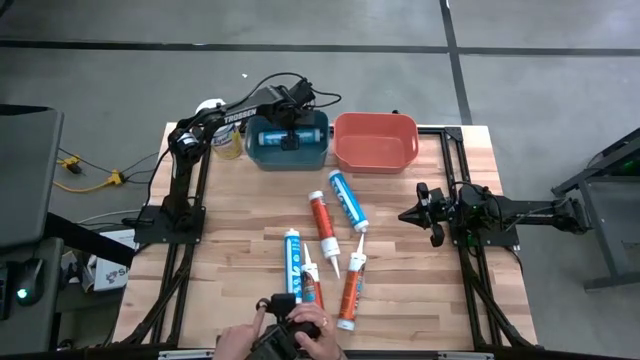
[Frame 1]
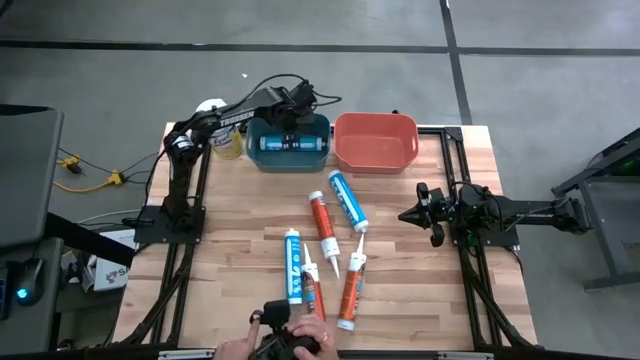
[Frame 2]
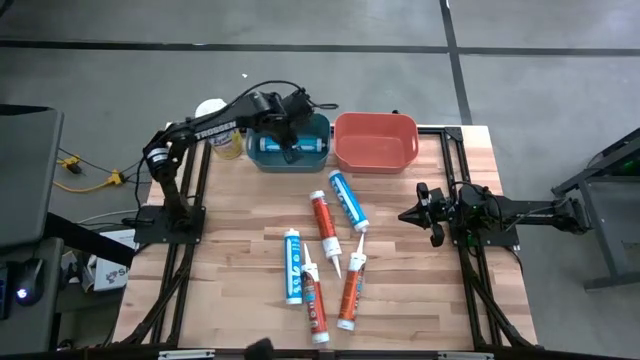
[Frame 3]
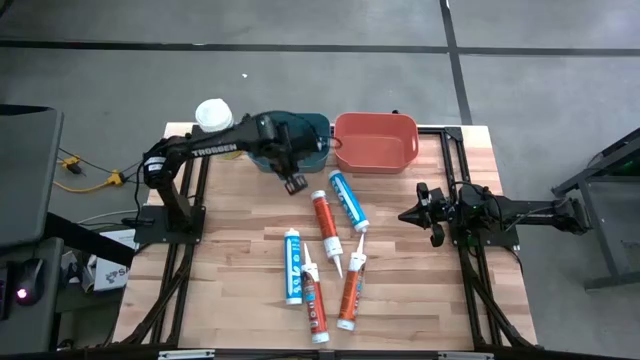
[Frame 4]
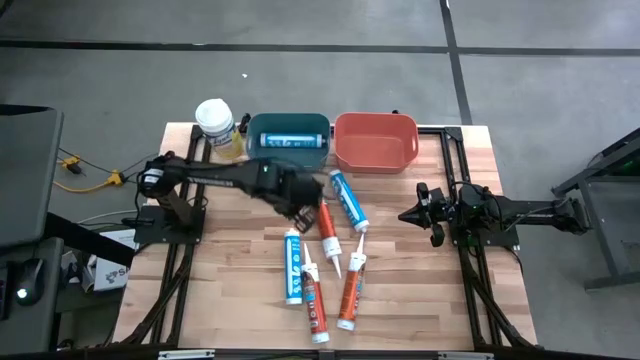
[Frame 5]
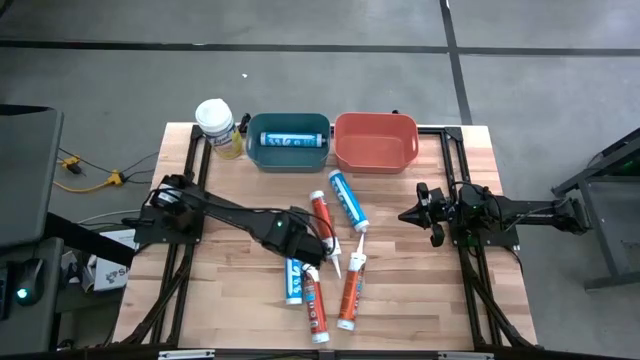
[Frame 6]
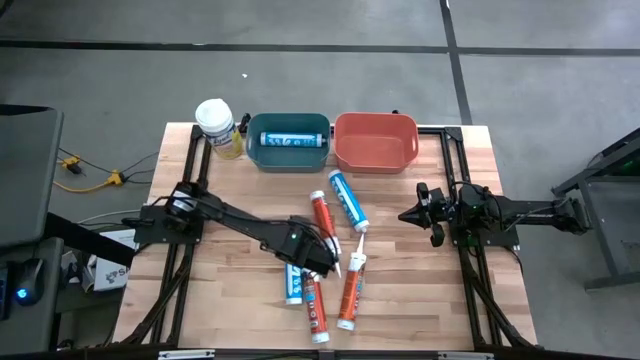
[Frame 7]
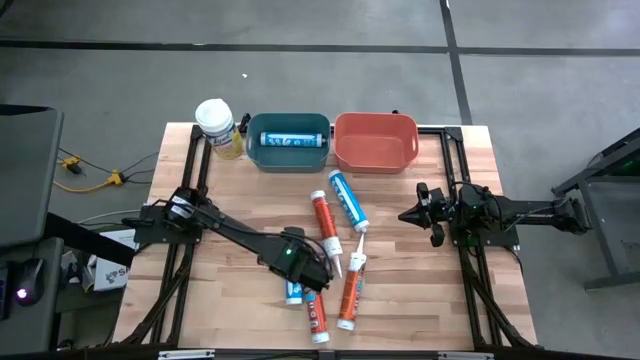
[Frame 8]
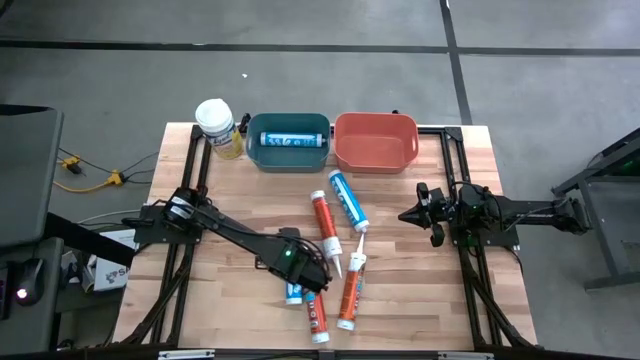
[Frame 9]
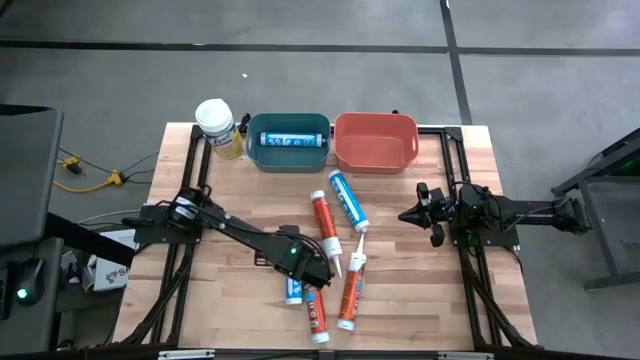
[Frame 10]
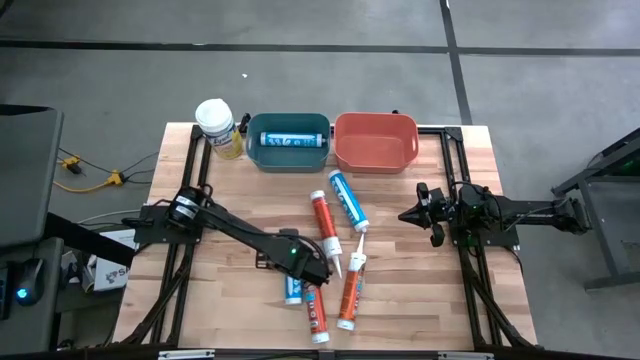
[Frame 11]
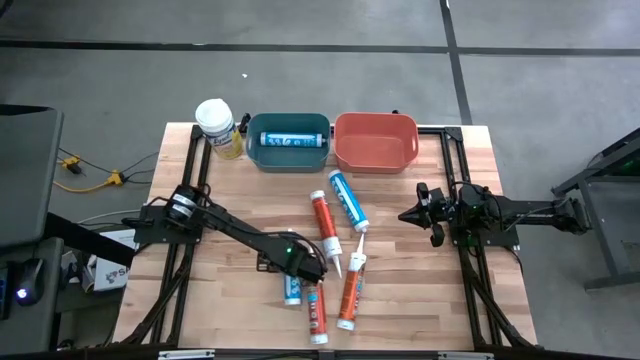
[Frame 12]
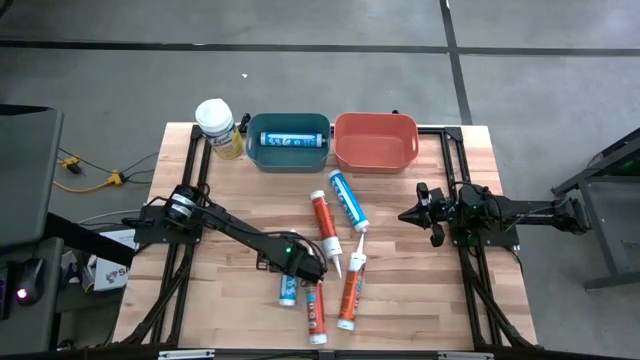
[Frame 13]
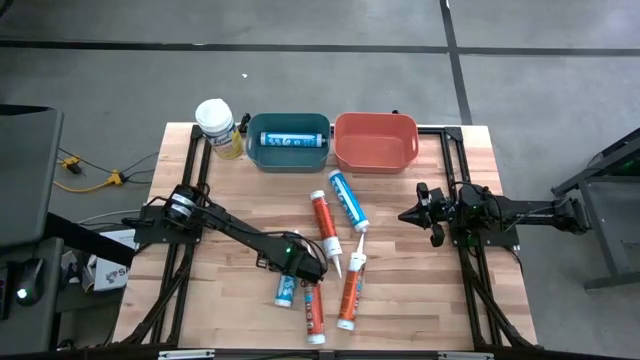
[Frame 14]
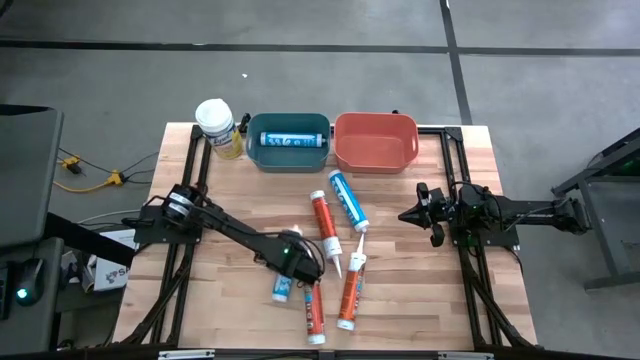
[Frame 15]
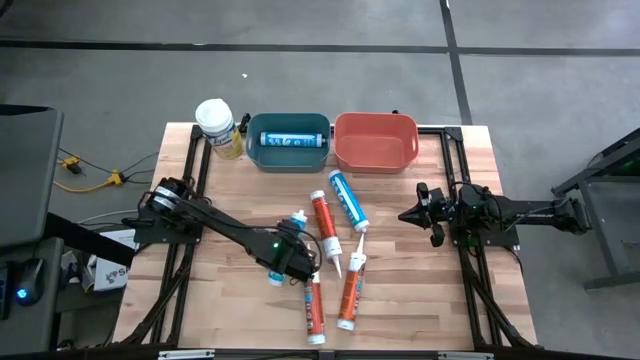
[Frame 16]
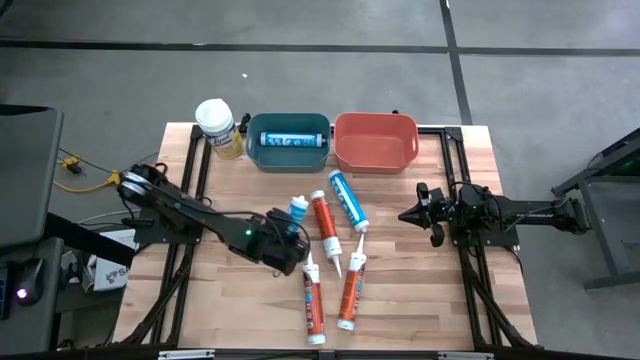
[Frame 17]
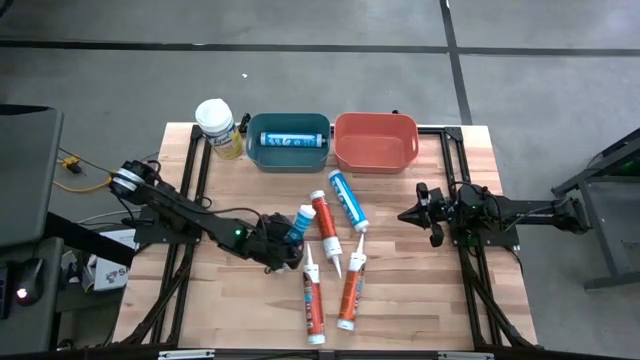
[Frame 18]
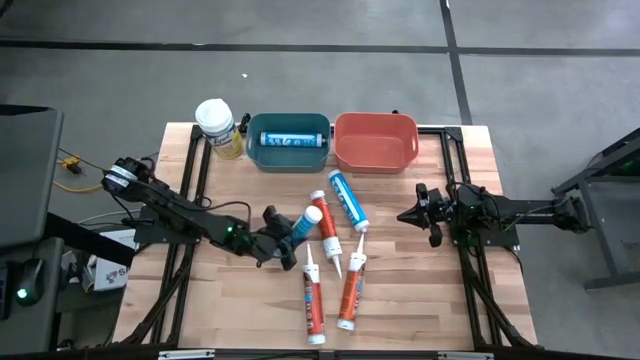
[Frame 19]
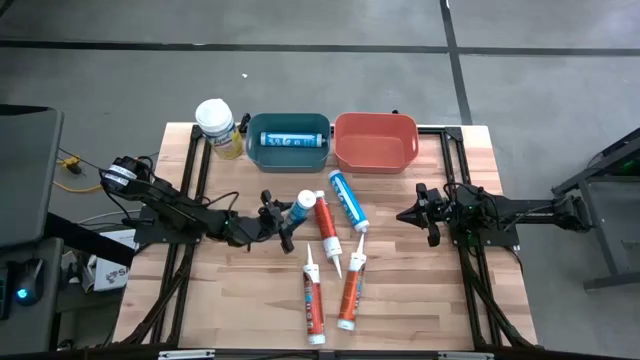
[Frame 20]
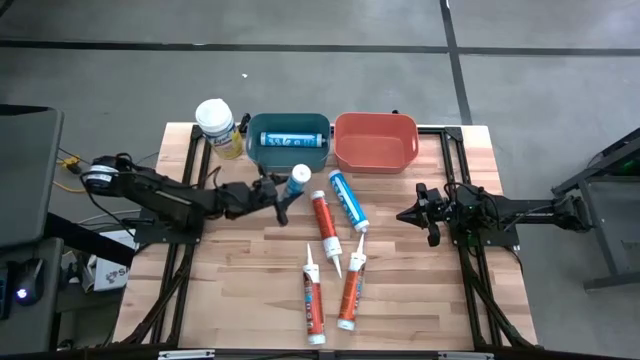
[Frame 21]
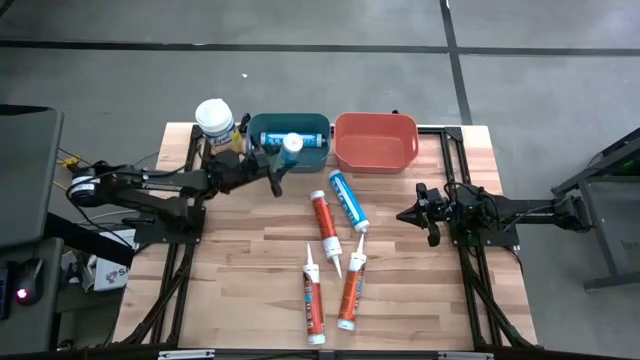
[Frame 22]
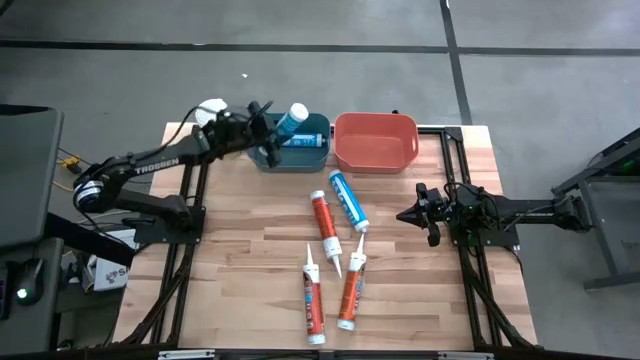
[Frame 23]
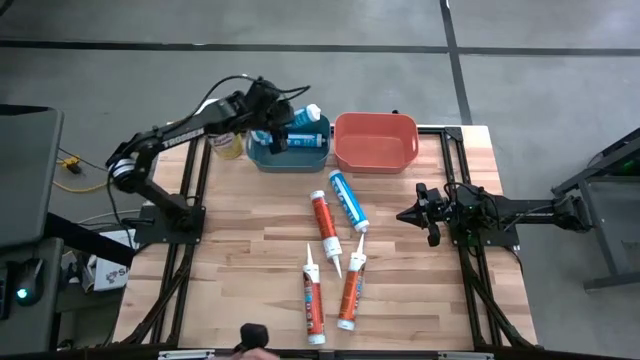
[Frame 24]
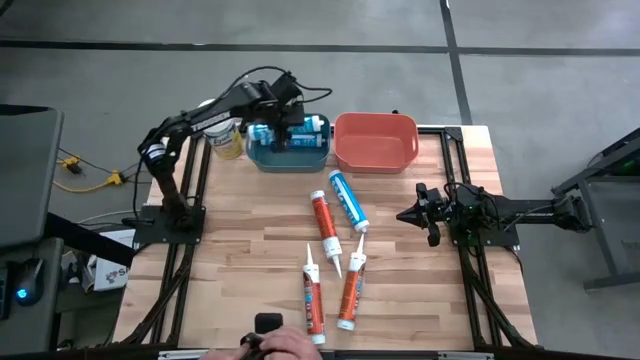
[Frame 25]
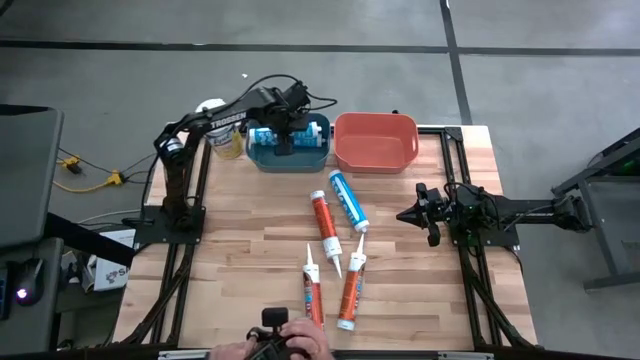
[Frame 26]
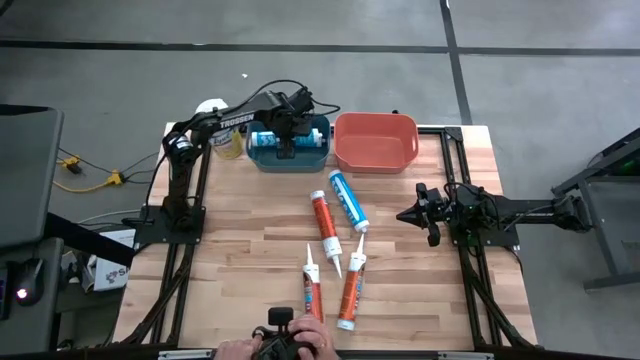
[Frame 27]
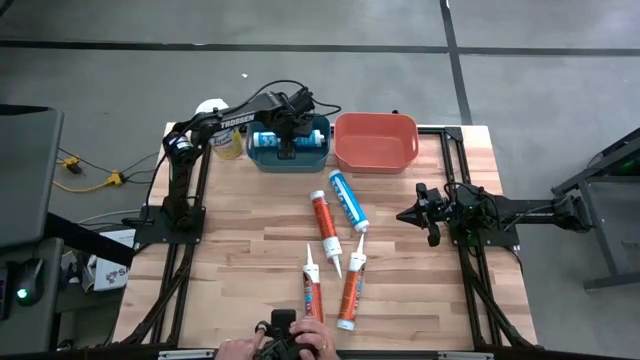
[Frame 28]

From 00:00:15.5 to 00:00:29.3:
Task: Pick & place silicon tubes, Sealant and Lysol wipes
Put the bottom blue sealant into the blue bin

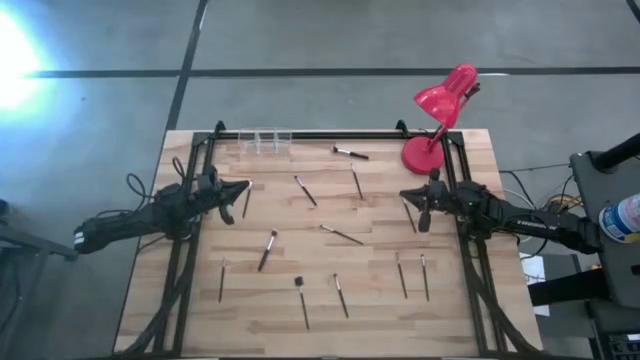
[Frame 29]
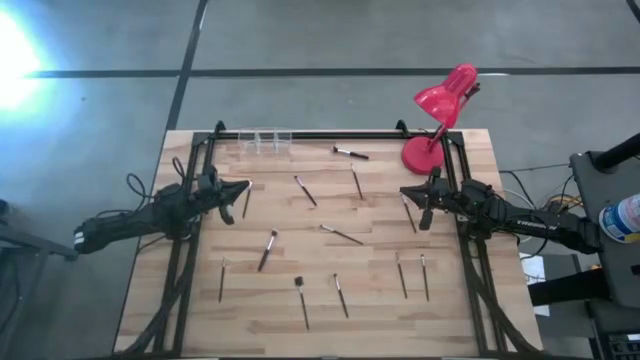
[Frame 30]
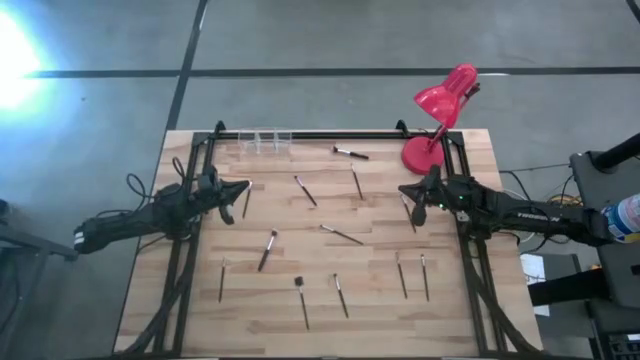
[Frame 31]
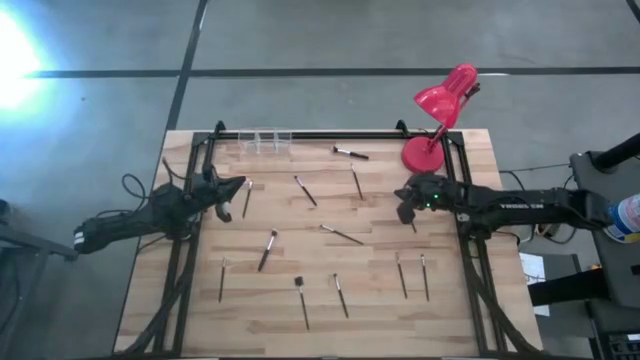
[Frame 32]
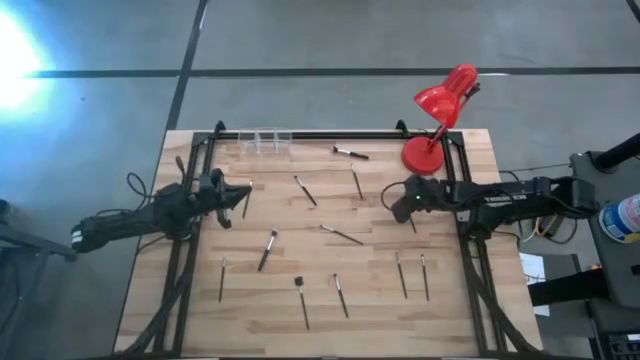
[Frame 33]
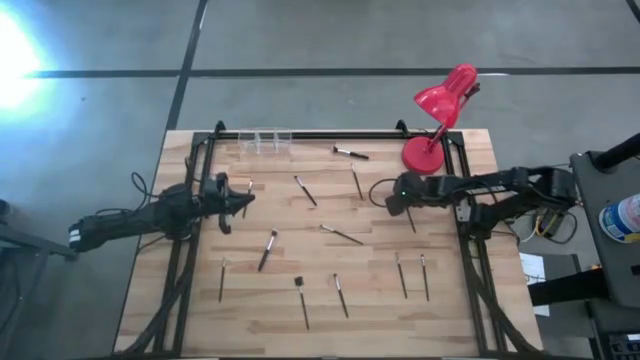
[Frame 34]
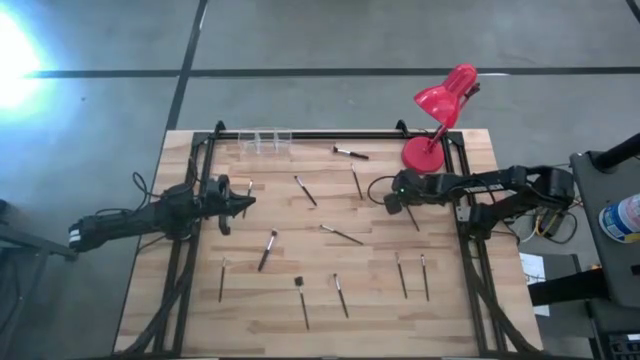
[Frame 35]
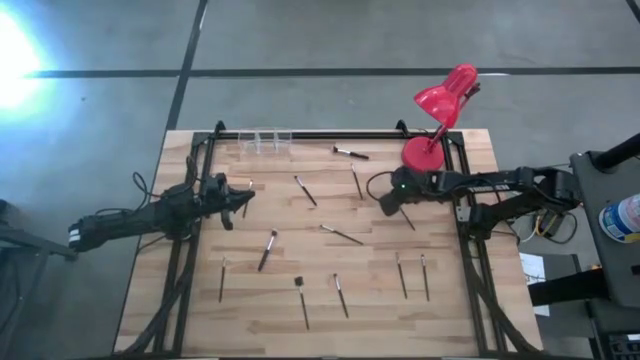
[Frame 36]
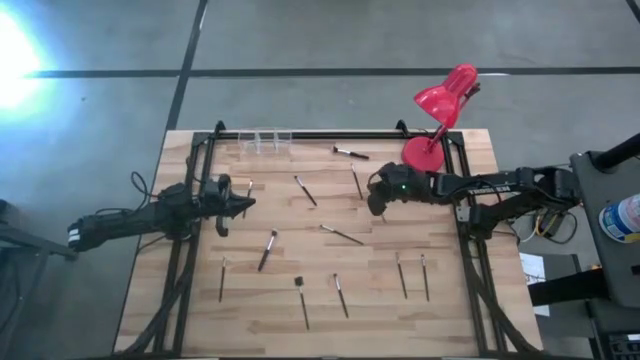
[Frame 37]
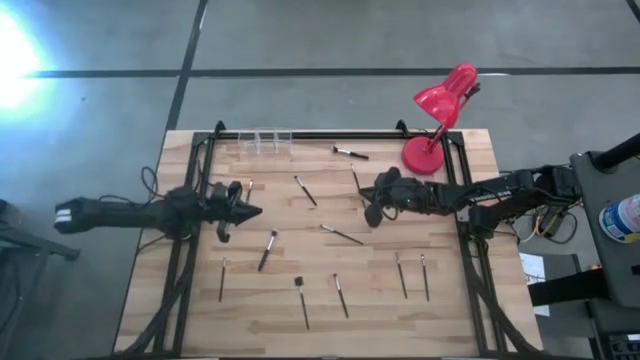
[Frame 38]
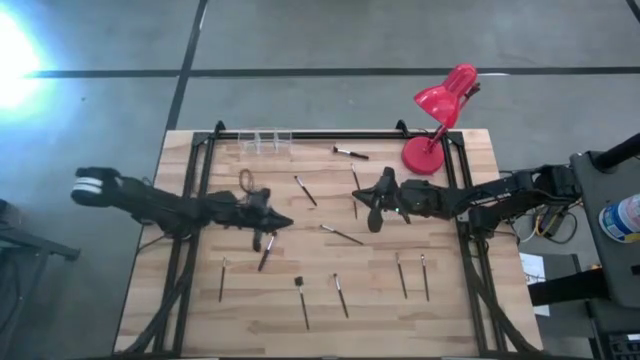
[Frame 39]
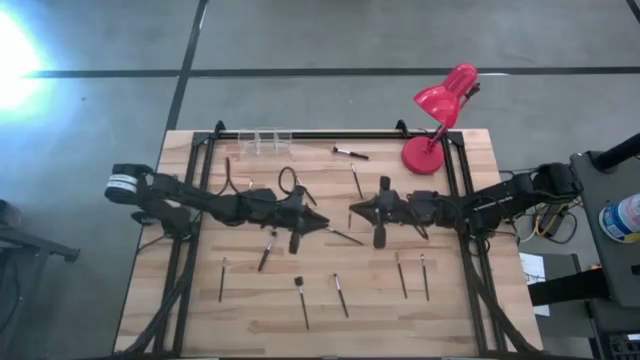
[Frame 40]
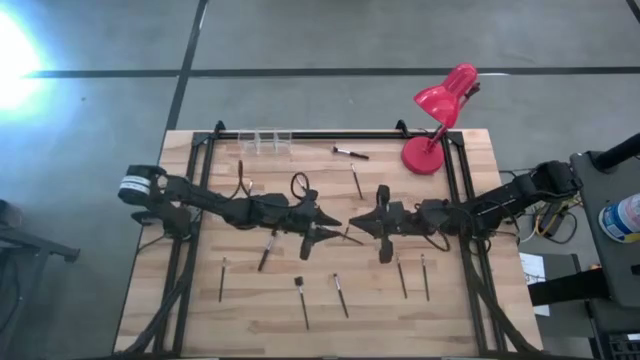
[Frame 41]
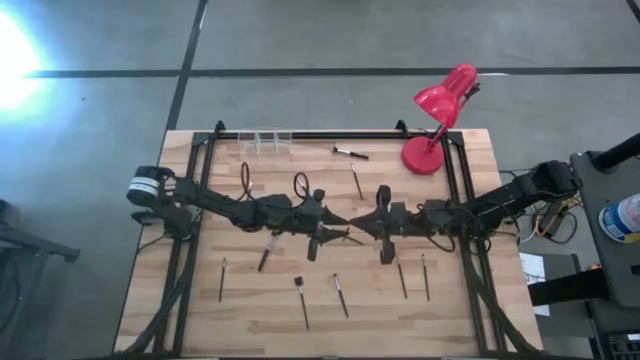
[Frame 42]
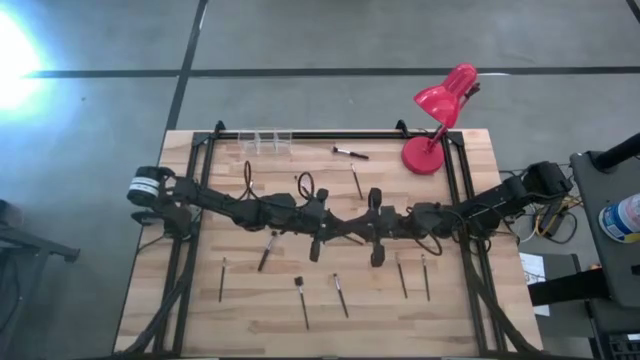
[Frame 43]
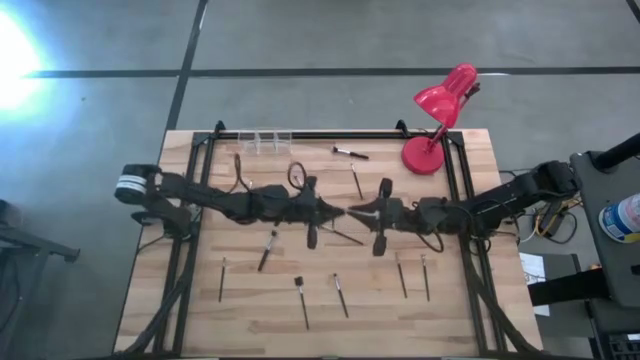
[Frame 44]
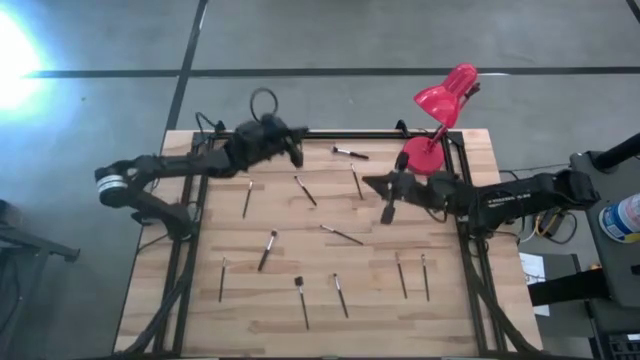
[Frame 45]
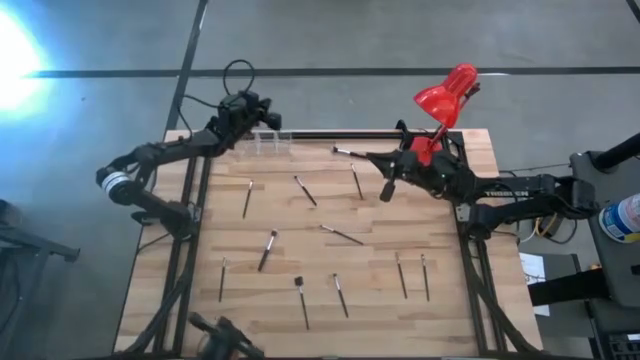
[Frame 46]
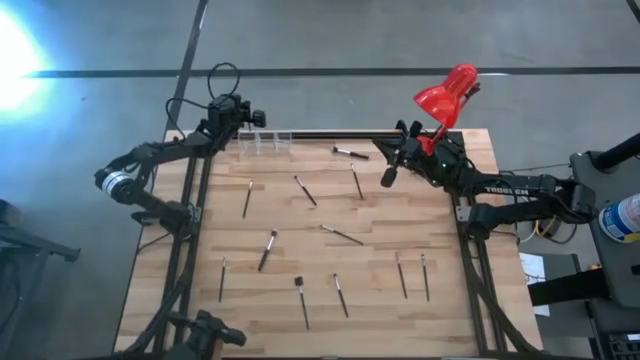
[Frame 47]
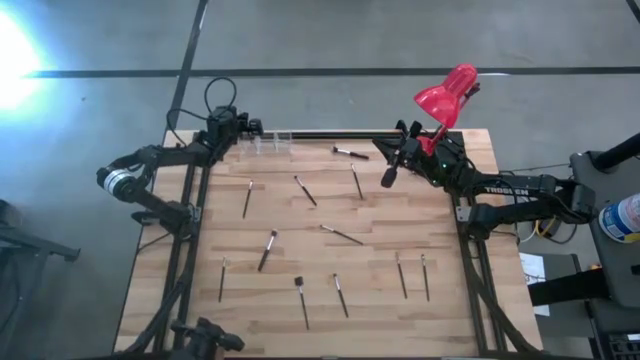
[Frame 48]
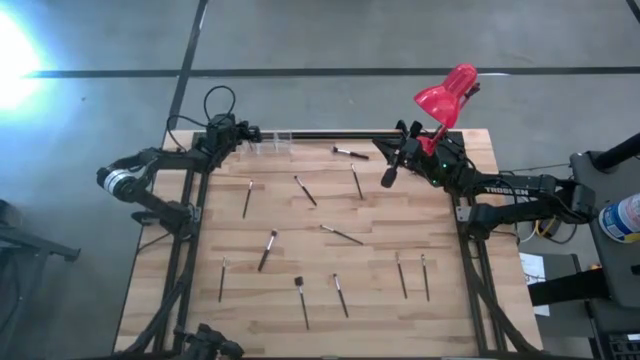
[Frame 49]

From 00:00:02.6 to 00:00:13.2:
Task: Put items in baskets/containers
Put the black eyeshadow brush into the transparent organizer
